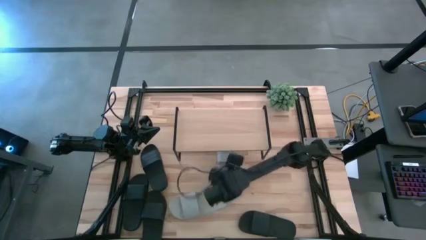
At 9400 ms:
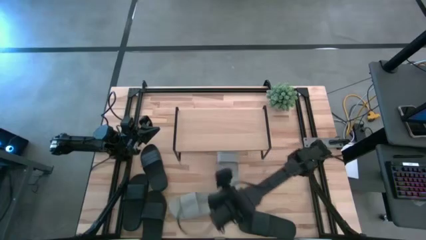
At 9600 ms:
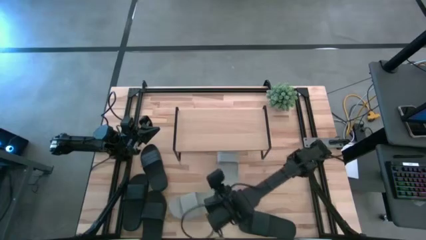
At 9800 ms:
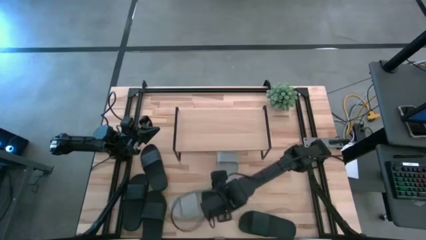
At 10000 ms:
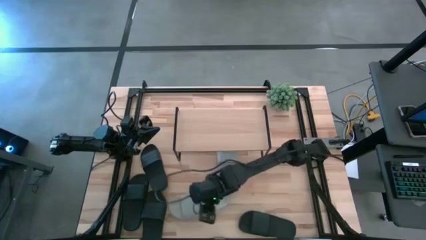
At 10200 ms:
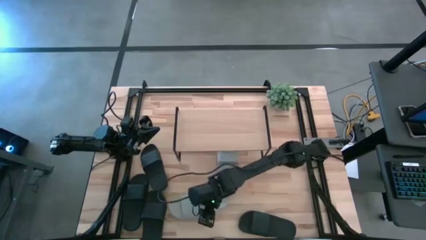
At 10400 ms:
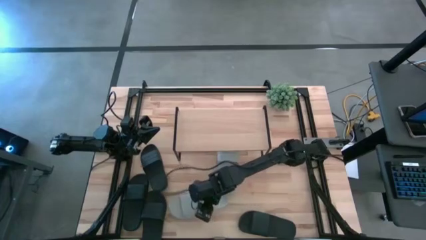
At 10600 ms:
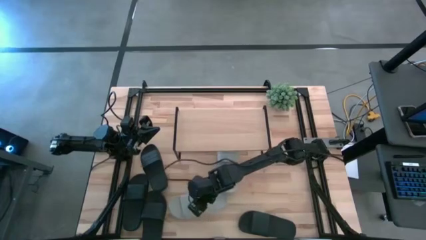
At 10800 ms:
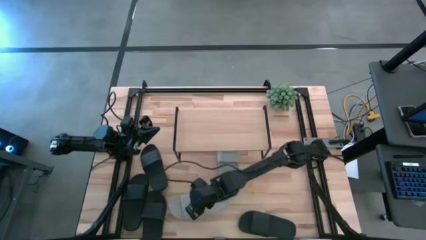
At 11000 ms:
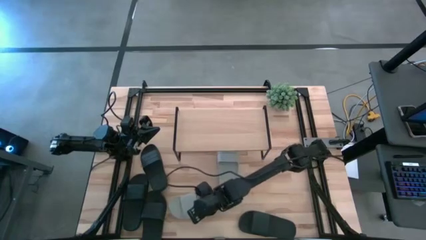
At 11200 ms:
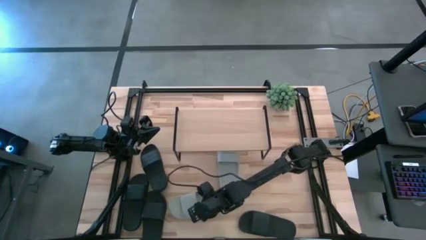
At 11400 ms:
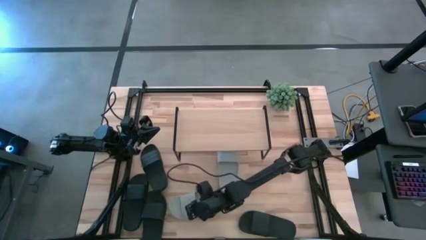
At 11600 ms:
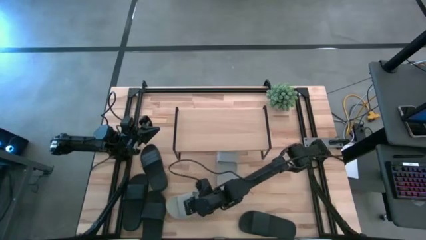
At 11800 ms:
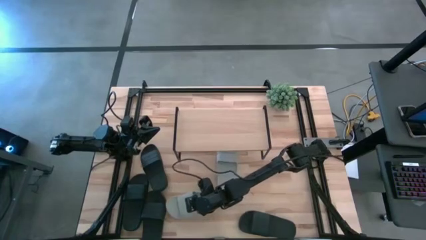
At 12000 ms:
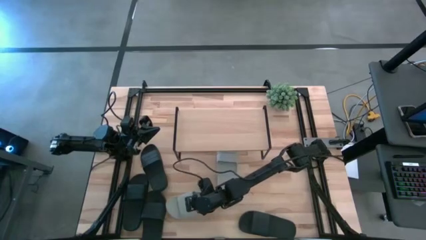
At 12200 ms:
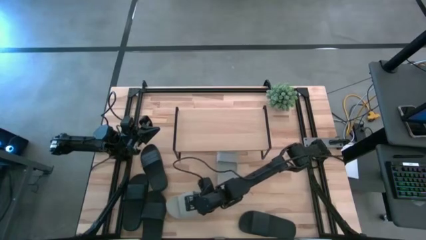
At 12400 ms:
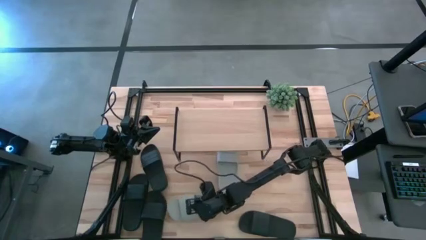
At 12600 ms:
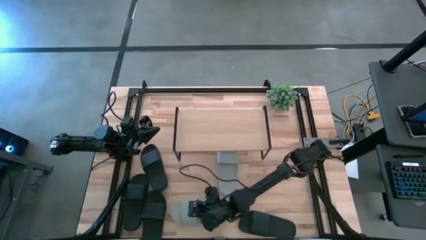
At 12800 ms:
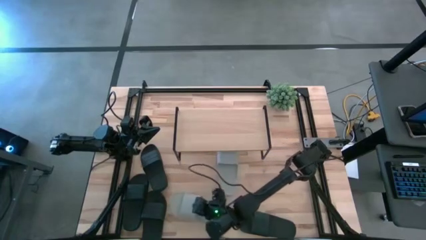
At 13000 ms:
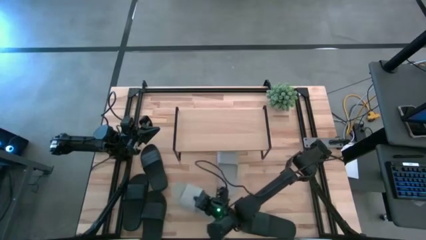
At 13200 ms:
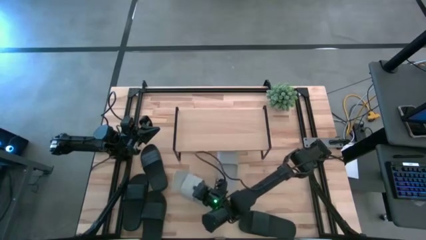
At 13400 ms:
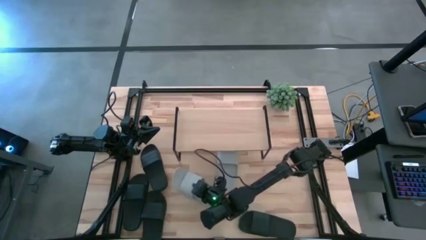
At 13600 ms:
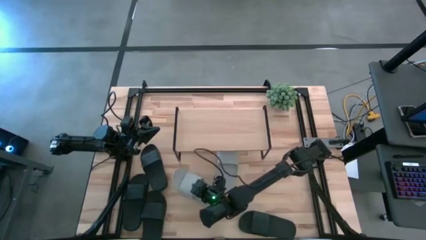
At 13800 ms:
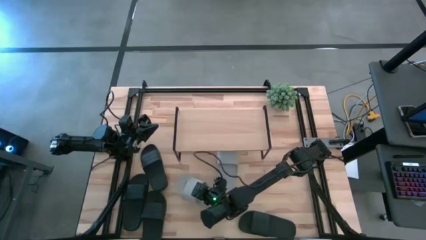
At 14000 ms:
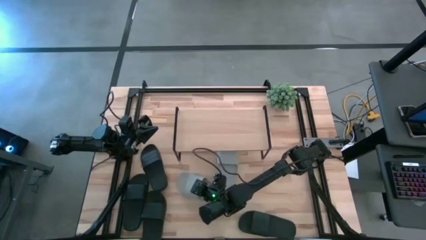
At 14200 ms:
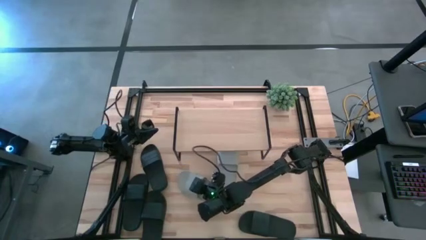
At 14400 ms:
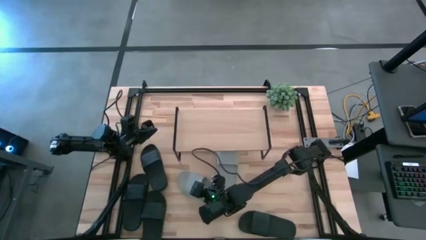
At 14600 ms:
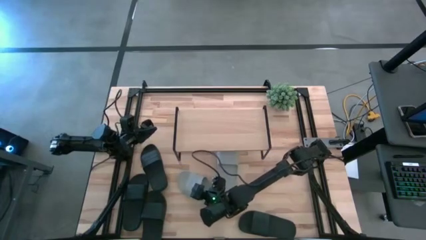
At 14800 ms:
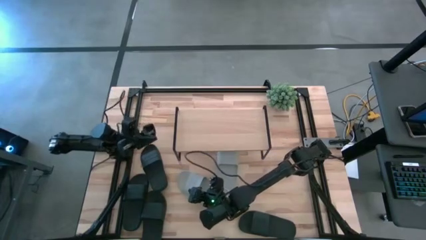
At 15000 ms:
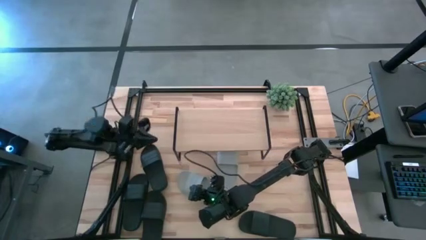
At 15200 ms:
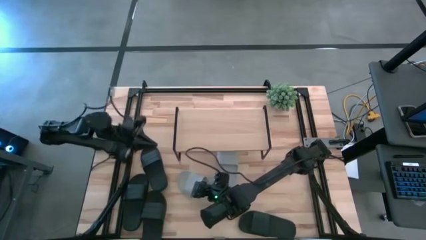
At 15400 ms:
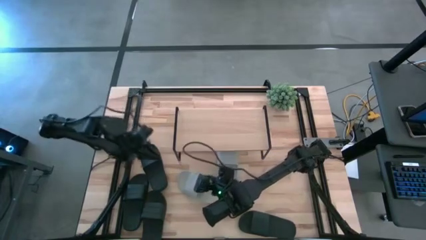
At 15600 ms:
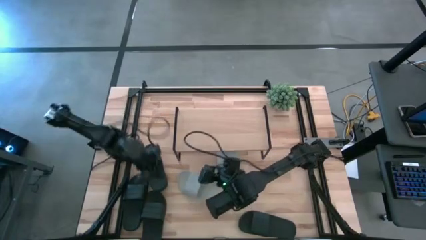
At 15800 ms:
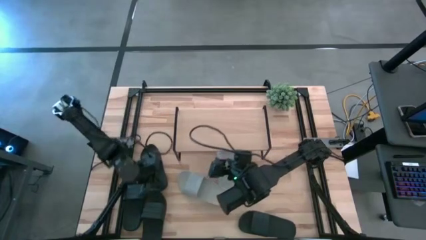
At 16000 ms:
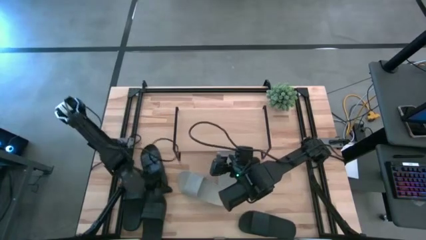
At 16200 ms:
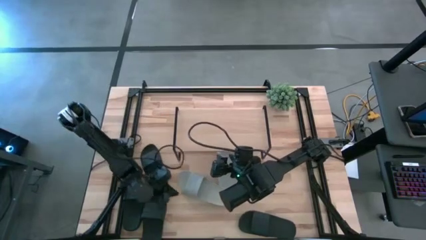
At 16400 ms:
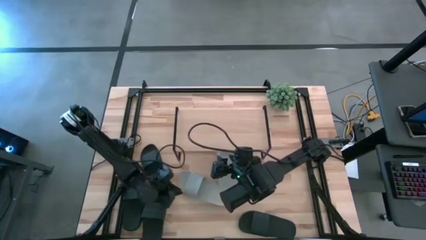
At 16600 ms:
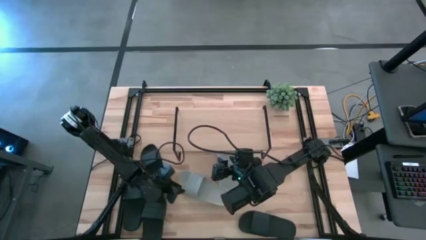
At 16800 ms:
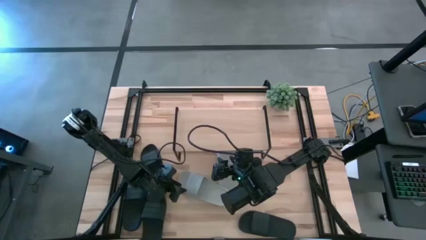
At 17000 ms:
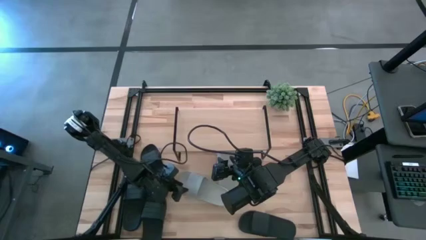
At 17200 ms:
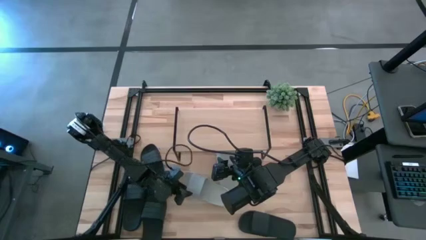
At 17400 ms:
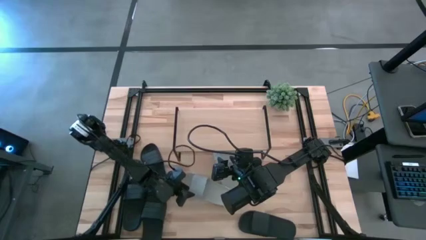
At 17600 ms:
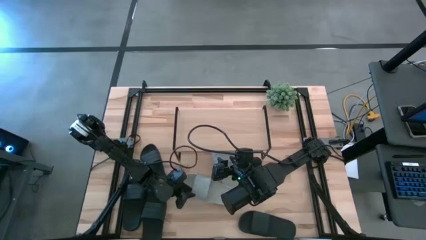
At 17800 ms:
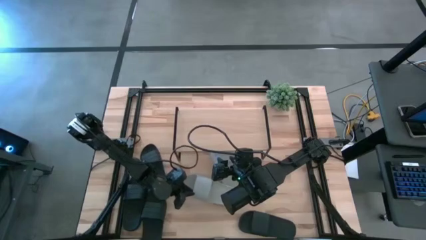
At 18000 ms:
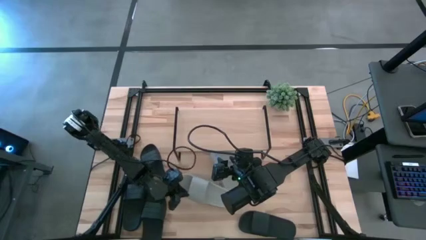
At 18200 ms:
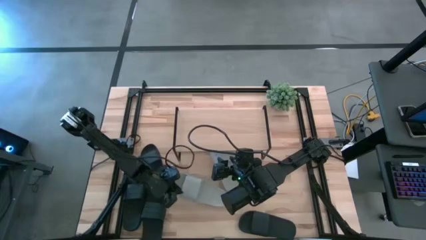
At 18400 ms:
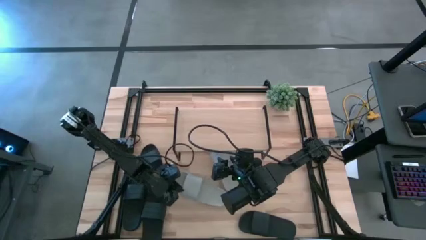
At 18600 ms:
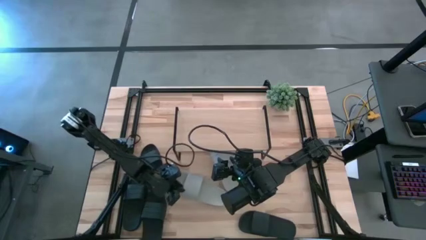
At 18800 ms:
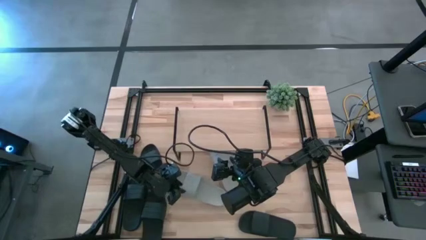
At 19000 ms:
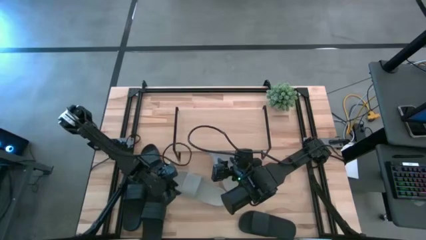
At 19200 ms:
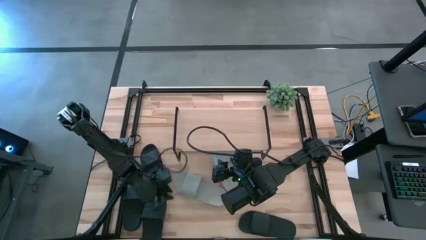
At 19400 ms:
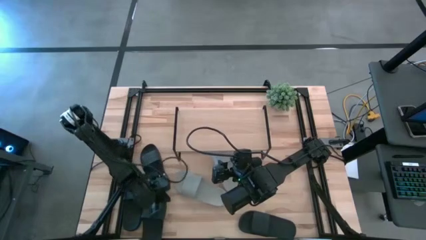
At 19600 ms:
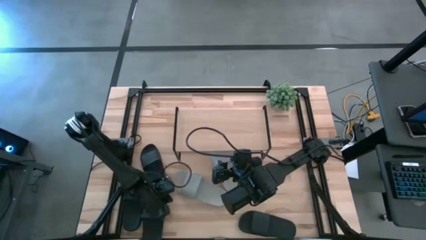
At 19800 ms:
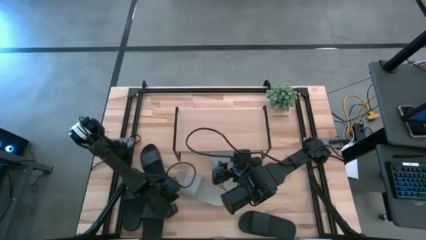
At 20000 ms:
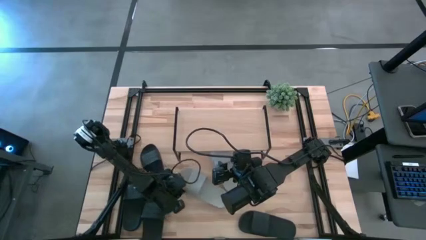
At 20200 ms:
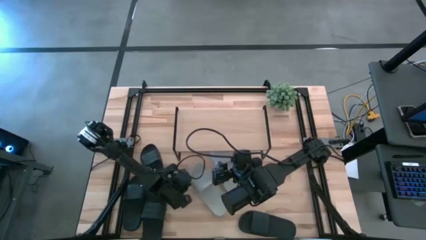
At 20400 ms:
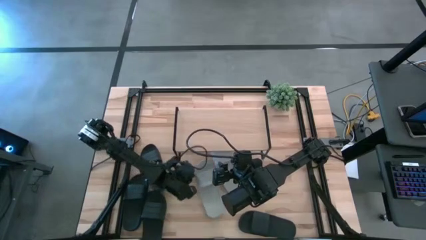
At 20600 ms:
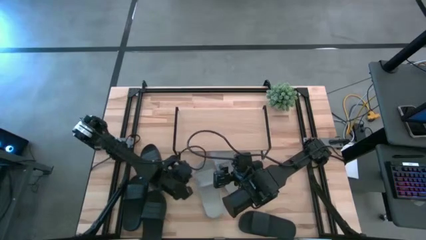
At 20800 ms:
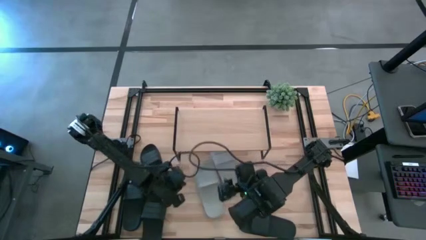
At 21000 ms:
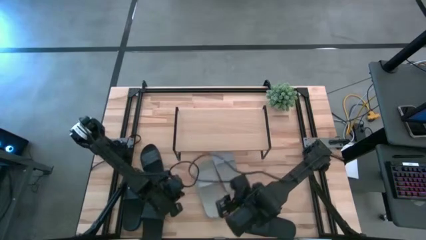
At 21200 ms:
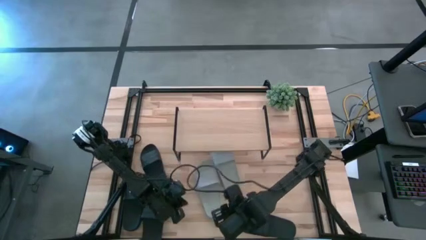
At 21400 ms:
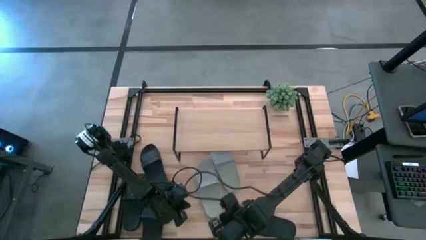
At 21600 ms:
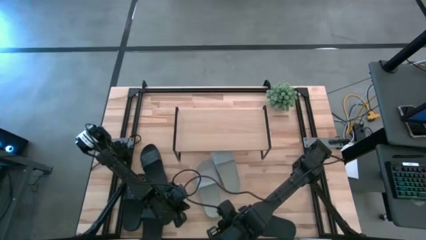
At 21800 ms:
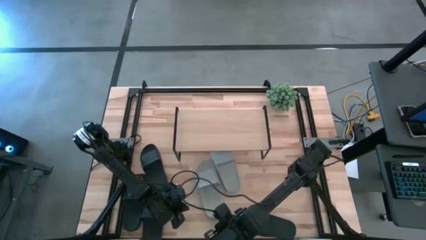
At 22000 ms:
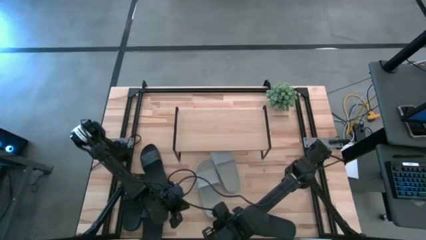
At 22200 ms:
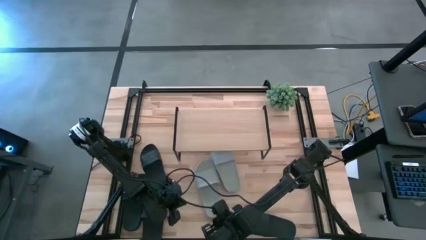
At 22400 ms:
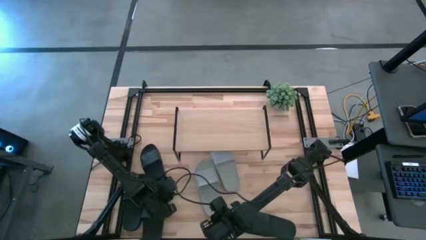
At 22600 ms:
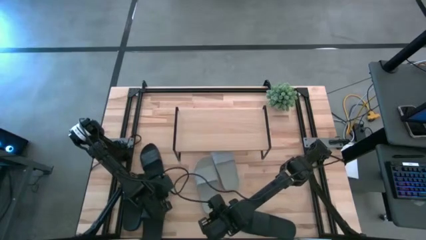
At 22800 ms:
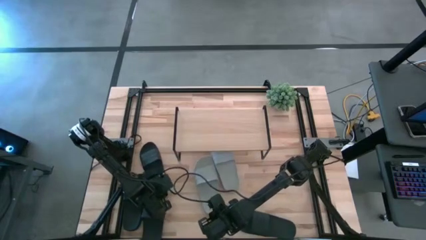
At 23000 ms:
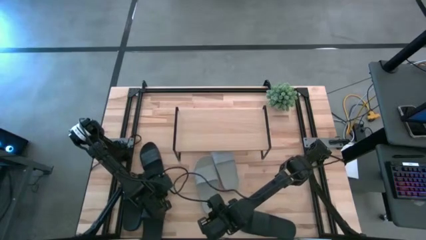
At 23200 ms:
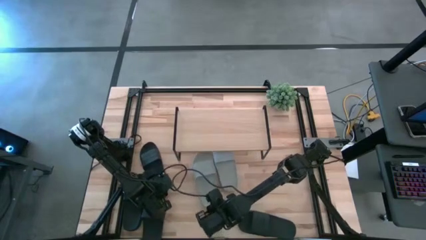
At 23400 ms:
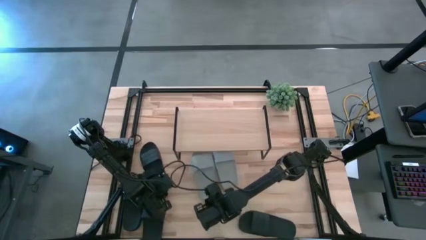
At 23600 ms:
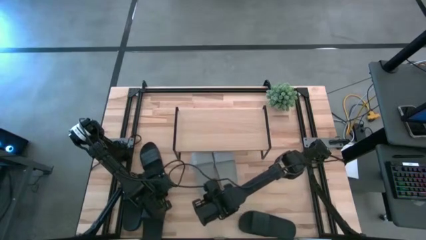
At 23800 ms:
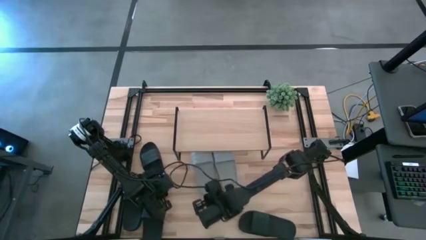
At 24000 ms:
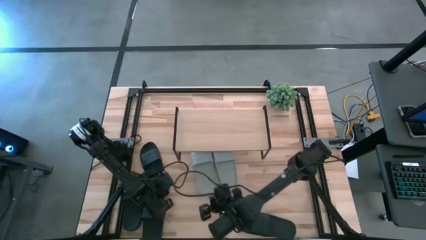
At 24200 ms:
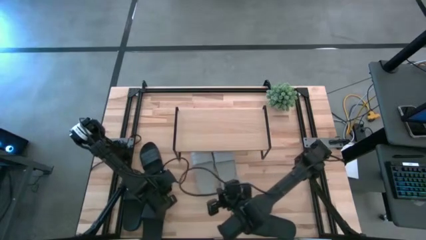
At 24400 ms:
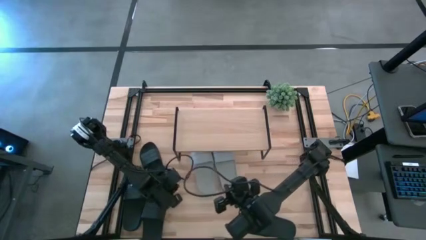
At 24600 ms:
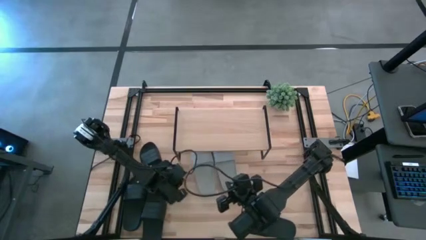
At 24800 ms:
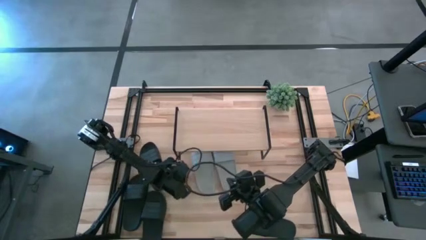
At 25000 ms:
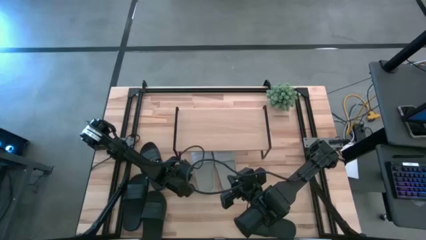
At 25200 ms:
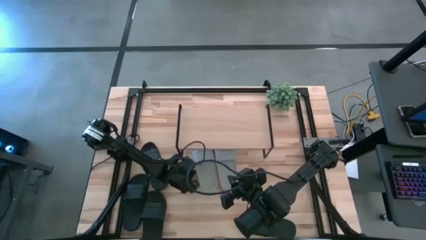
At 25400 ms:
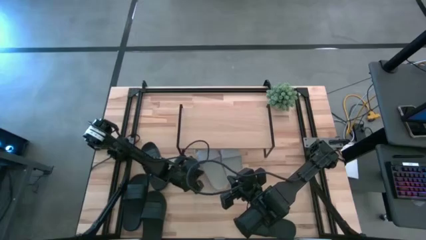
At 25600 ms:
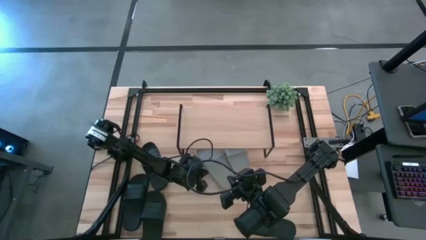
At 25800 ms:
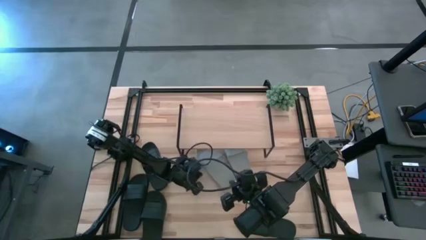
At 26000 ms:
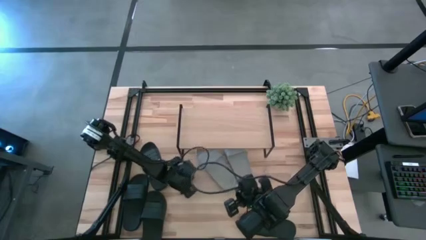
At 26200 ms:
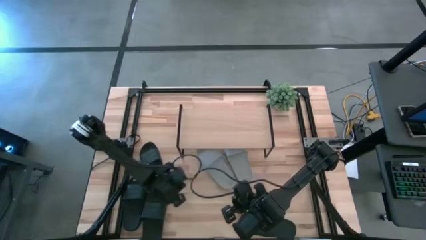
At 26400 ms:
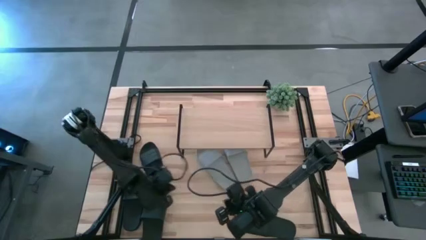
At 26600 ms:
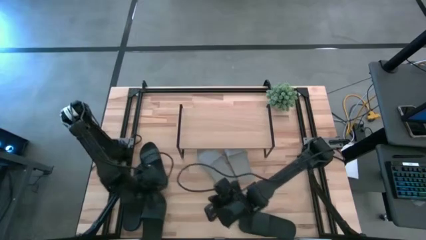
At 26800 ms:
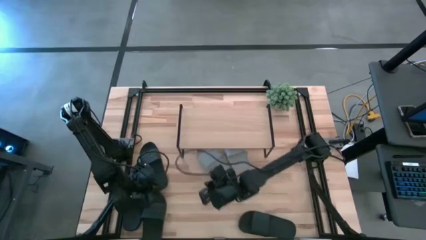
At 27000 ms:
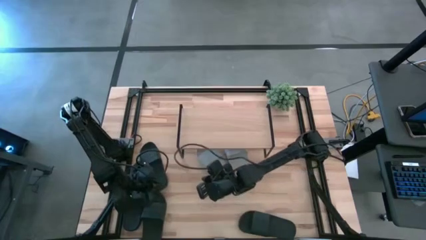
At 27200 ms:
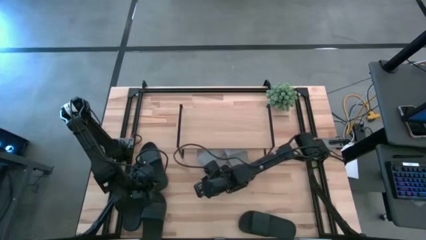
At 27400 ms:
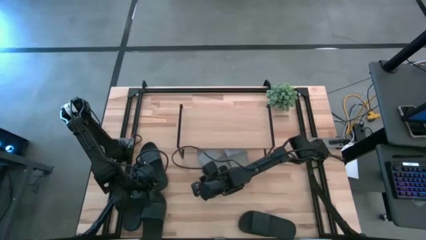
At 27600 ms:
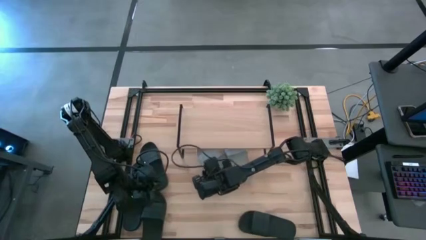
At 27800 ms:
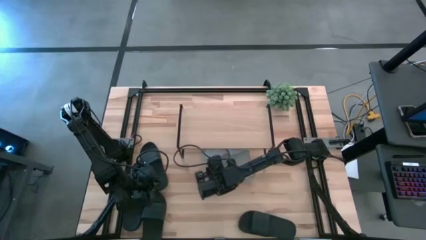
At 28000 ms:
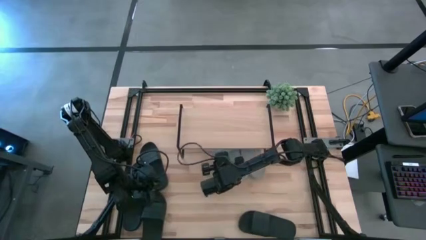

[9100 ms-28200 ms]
Task: Pick and place slides into the shelf
Move the left gray slipper to the middle of the table
